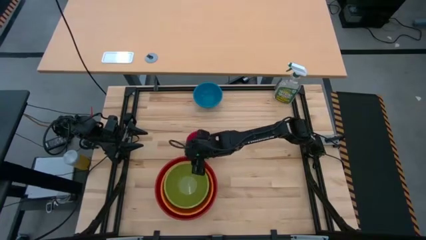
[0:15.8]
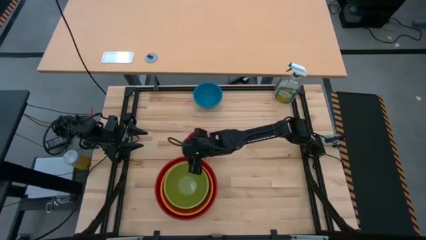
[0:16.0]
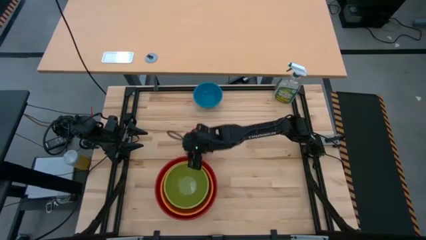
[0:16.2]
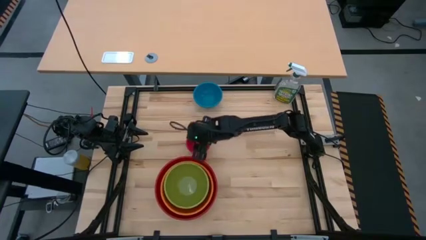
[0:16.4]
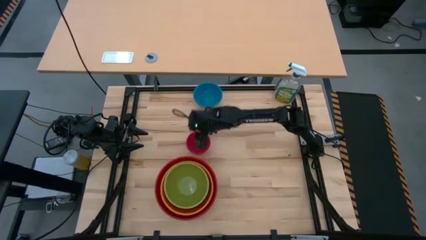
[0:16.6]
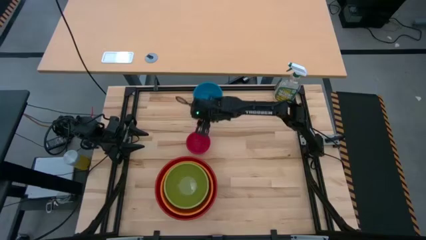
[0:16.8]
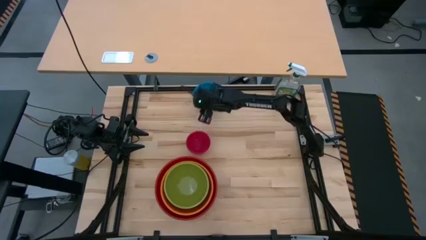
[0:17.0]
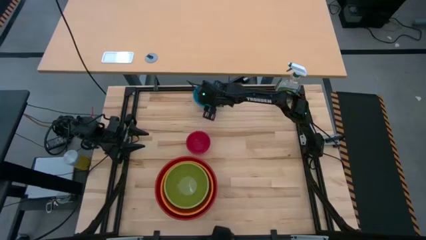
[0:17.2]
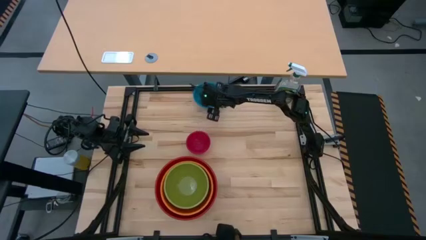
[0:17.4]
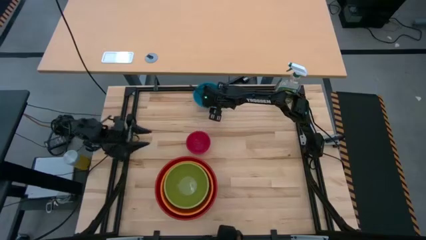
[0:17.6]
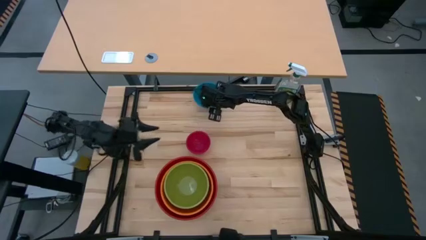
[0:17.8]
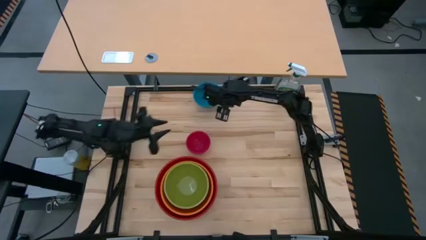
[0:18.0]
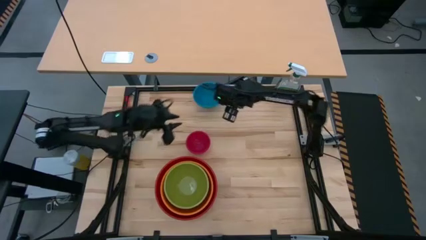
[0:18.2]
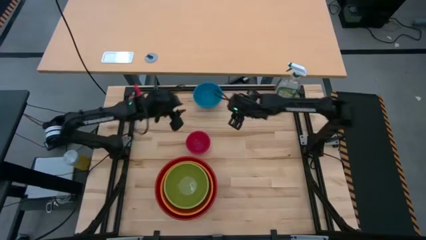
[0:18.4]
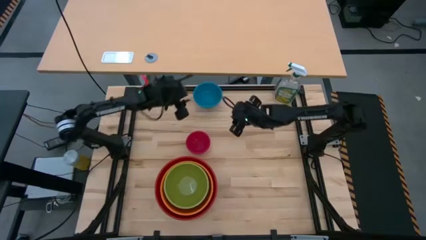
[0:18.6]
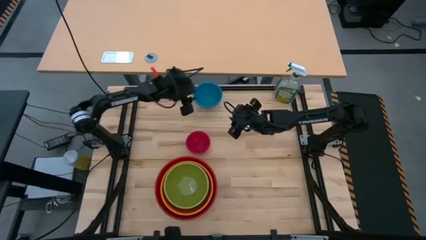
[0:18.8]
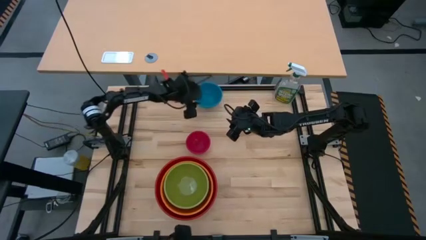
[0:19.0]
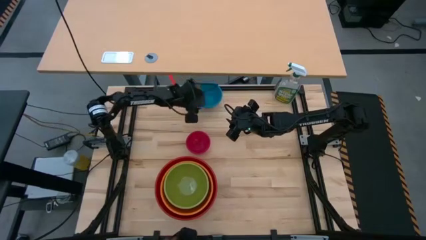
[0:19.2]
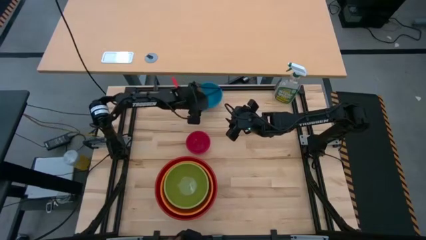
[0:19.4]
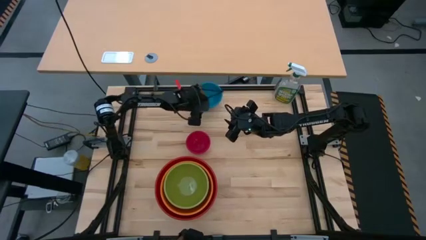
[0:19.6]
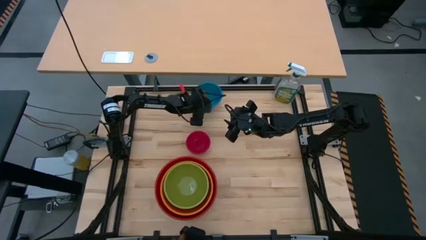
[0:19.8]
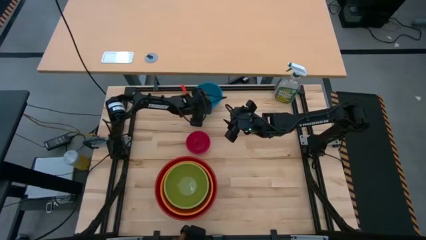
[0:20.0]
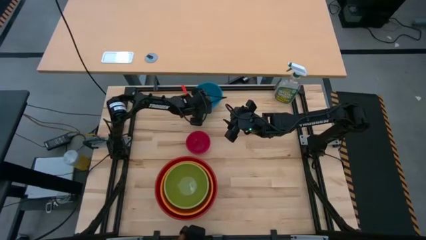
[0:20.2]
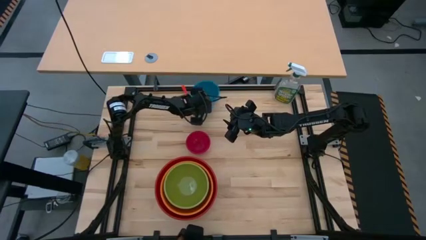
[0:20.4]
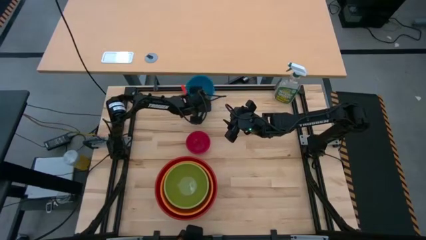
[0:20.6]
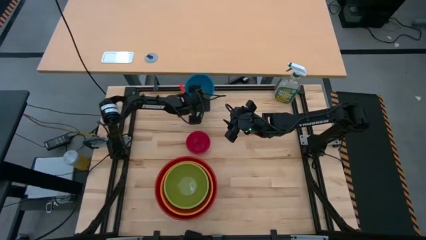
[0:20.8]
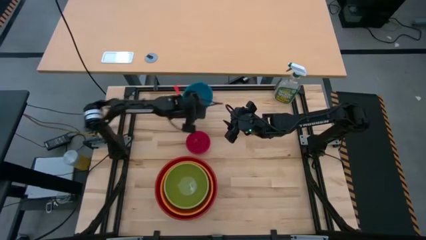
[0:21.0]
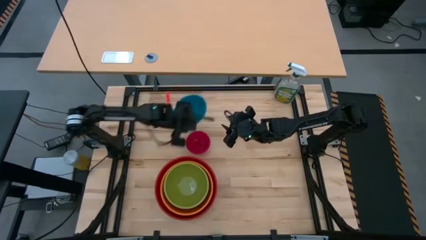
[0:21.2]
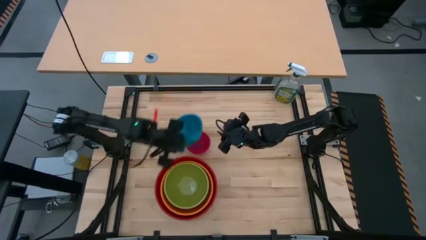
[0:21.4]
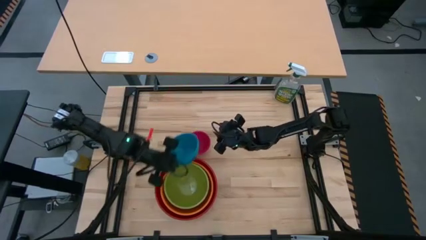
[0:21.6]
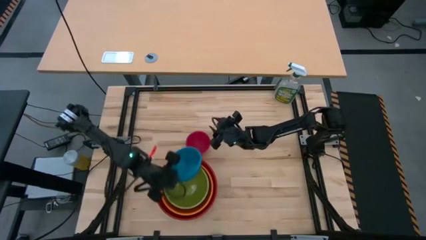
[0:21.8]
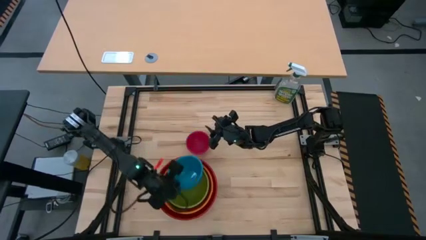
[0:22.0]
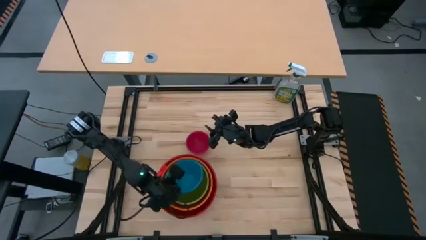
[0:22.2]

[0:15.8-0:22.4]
Stack the blue bowl onto the green bowl

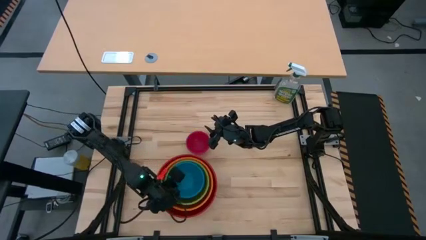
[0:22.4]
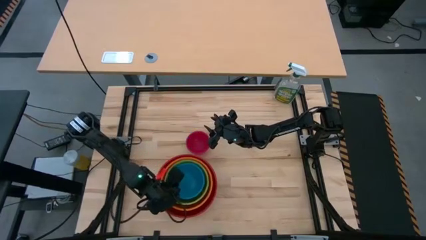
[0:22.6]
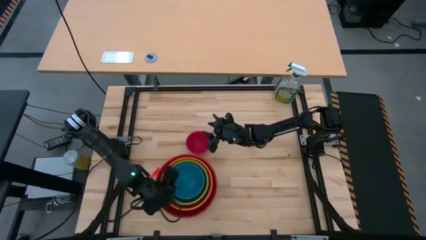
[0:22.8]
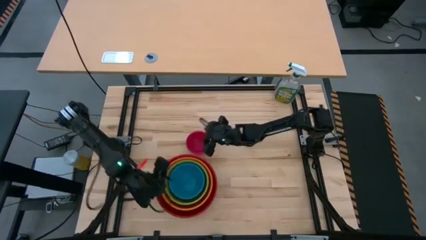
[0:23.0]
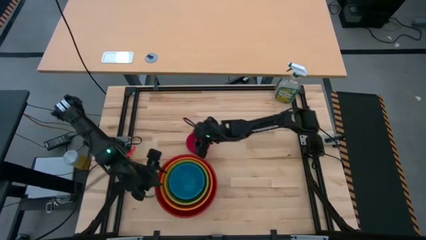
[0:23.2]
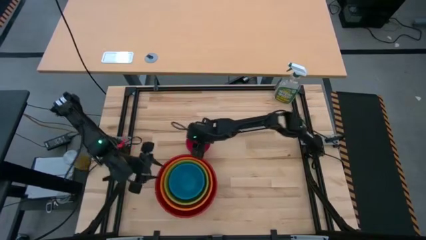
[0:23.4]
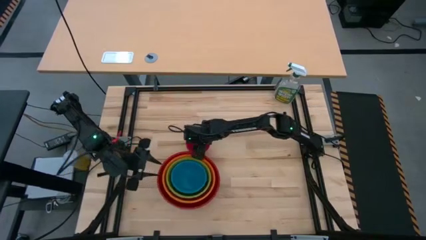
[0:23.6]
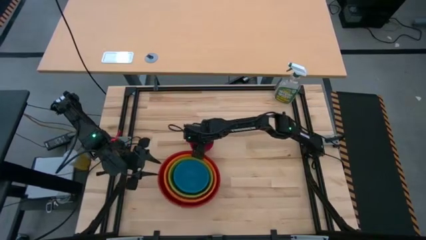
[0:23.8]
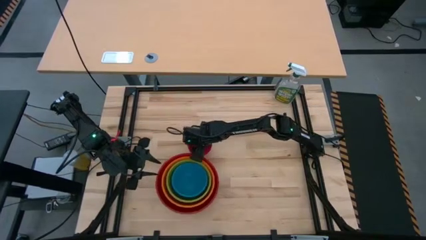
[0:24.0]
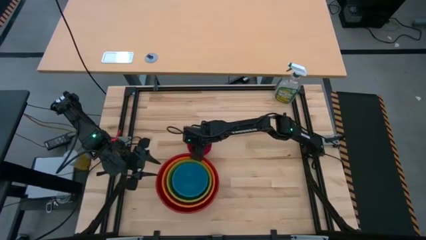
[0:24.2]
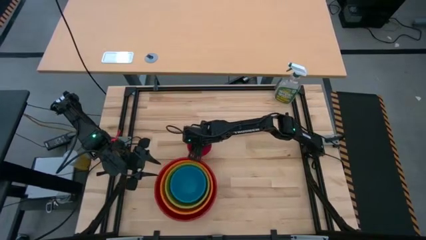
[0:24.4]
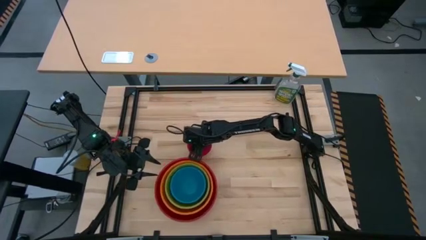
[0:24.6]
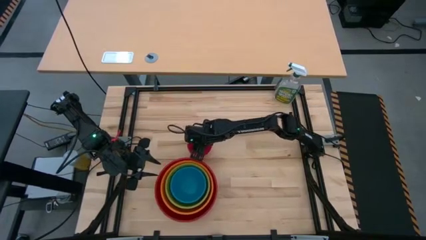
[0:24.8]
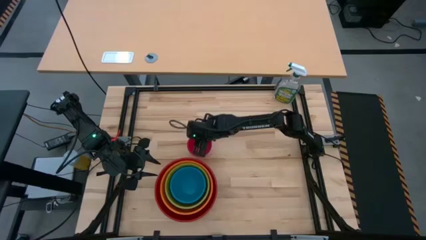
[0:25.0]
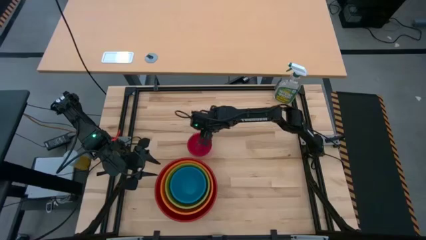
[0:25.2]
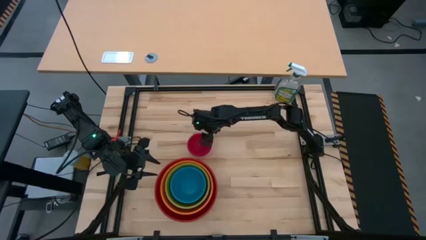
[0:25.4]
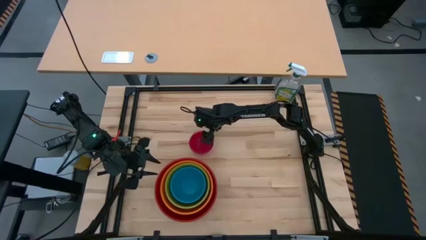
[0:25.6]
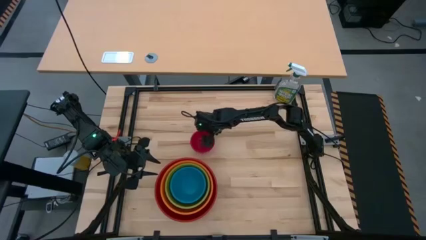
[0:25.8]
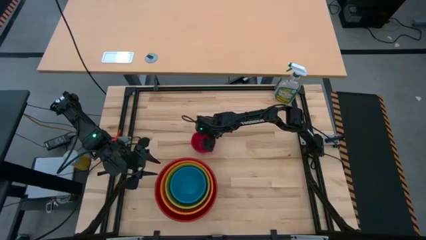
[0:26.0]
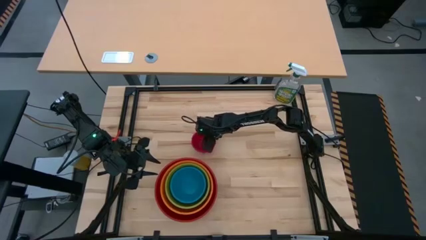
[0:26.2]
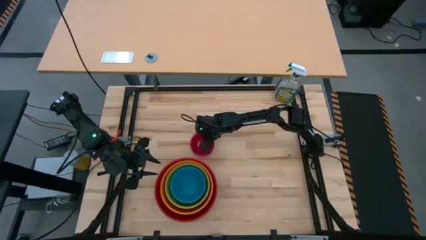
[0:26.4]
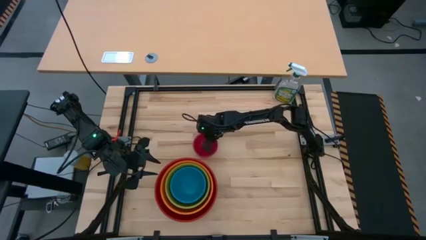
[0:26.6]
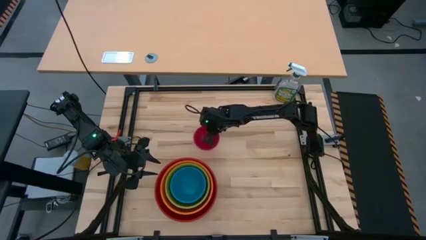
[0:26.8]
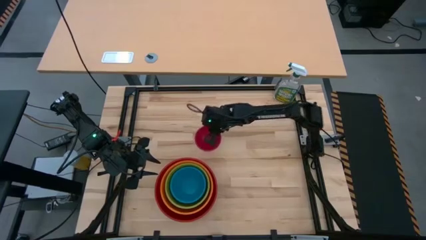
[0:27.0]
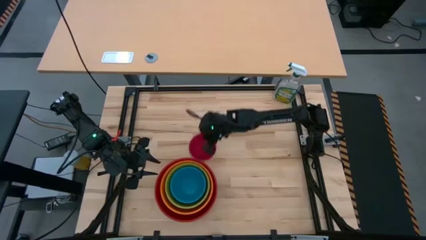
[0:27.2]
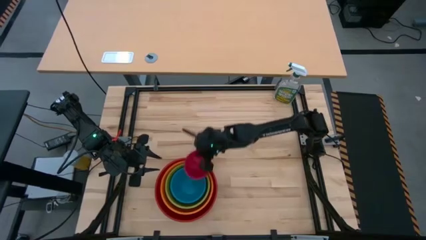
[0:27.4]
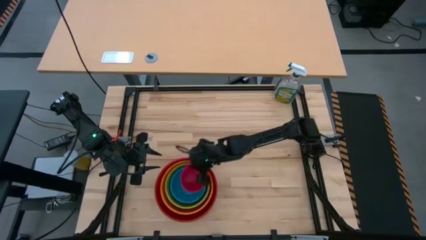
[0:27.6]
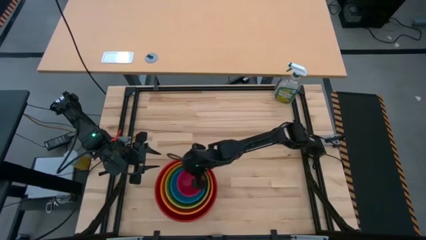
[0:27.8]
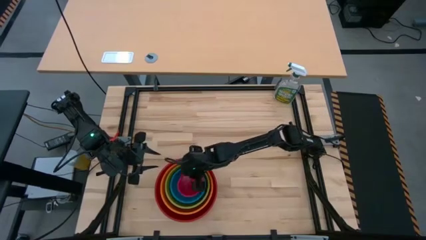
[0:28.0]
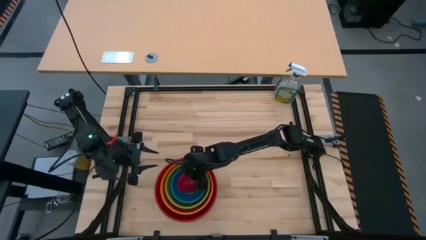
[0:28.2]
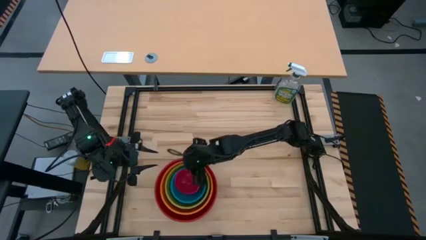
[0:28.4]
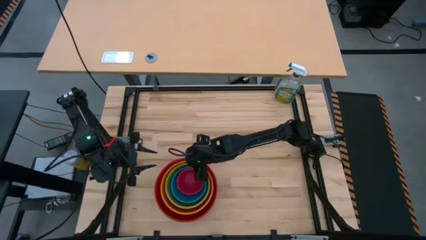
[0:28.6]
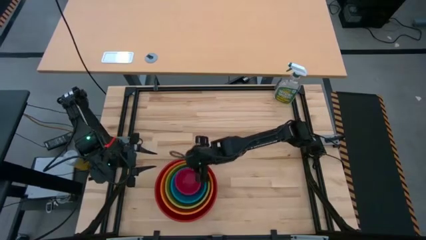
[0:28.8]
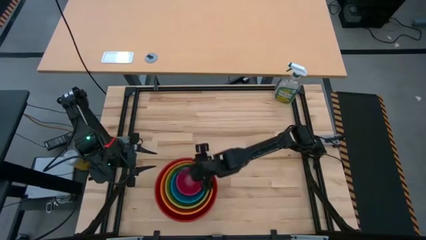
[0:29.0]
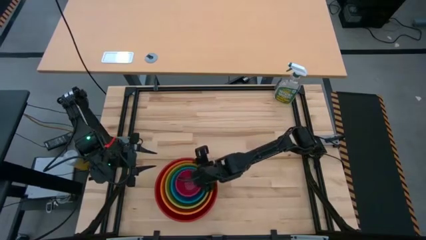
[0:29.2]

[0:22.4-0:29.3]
Stack the small red bowl onto the blue bowl
